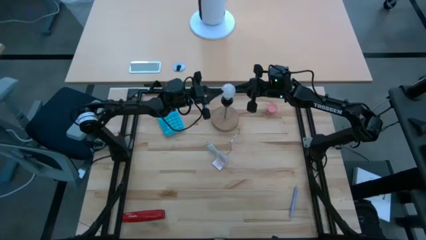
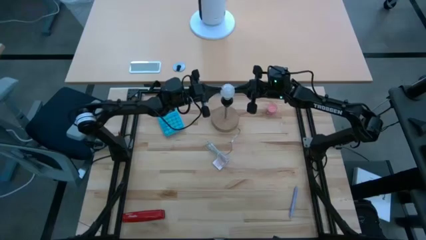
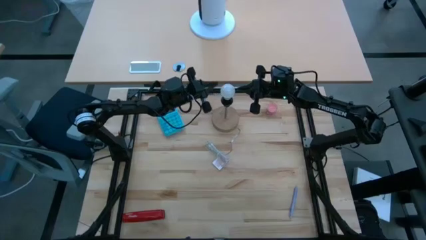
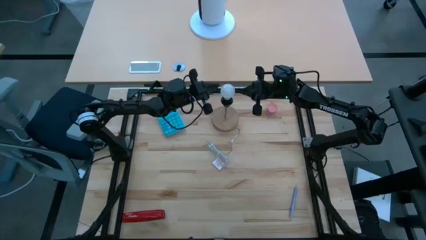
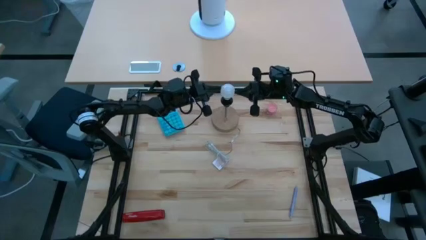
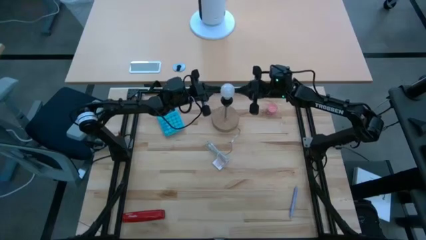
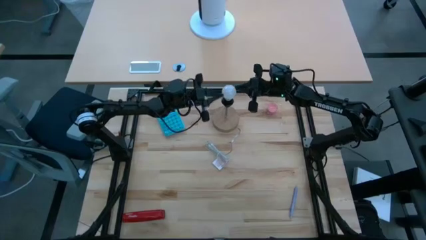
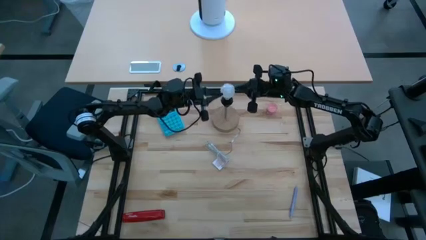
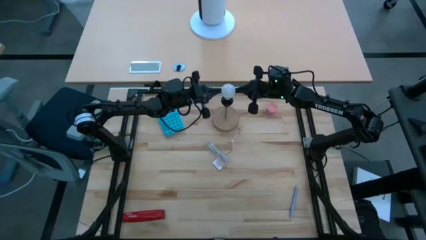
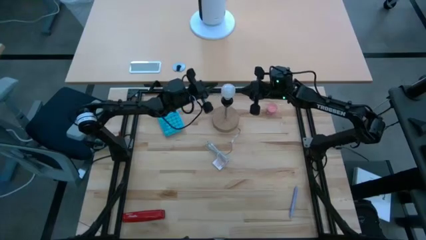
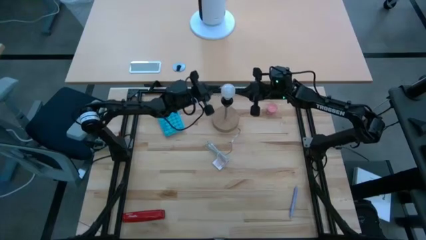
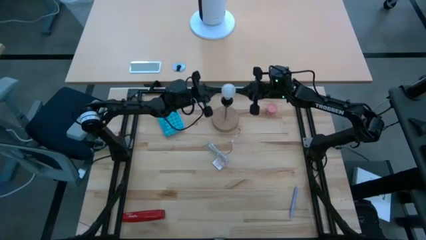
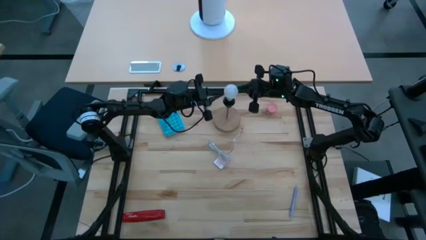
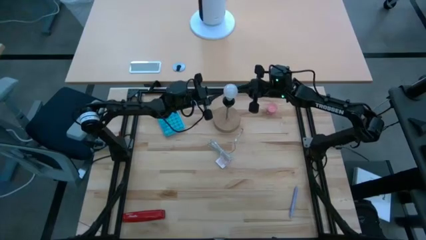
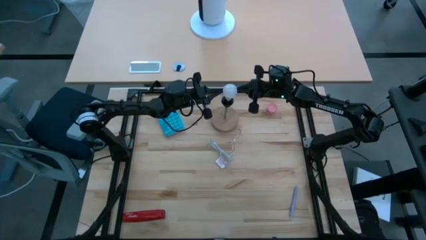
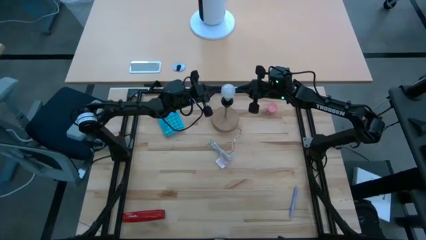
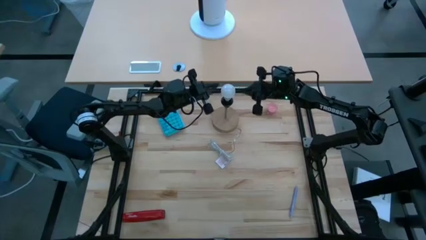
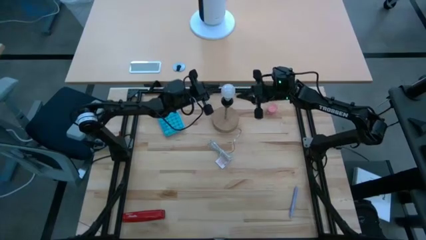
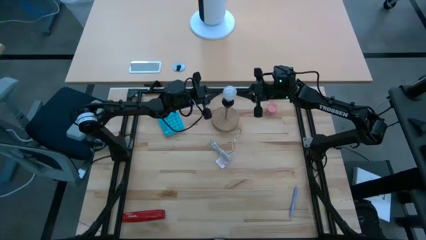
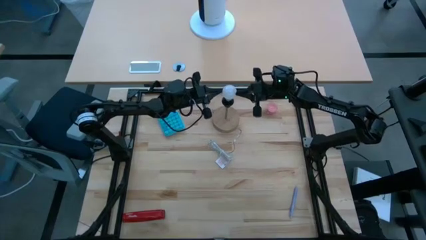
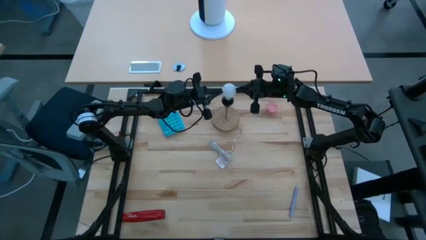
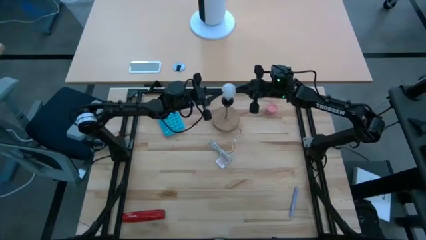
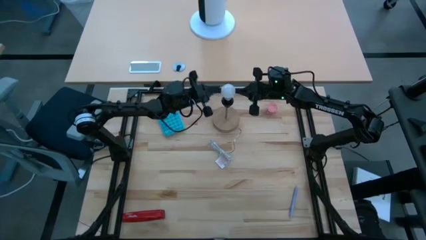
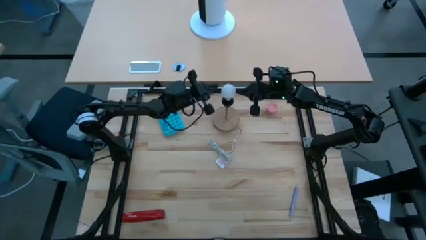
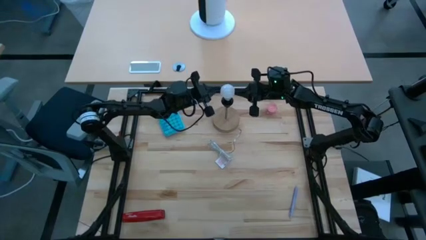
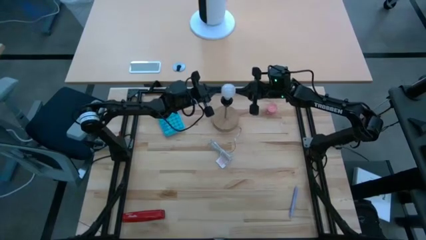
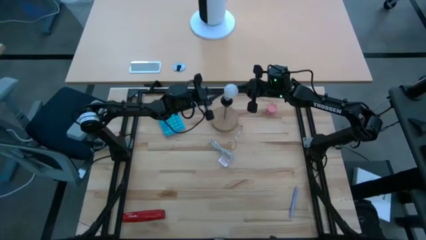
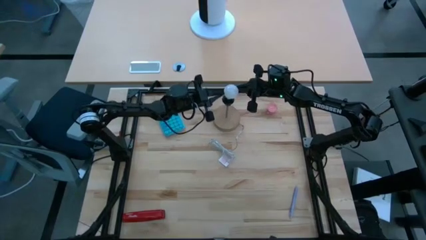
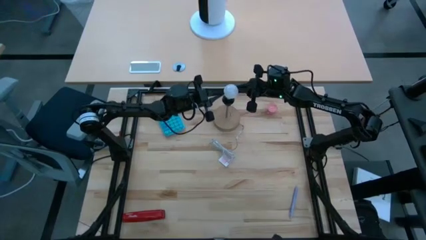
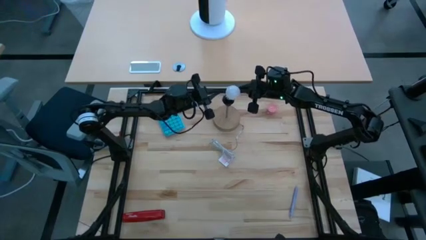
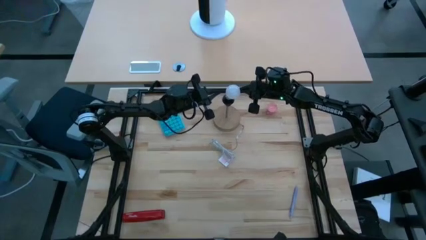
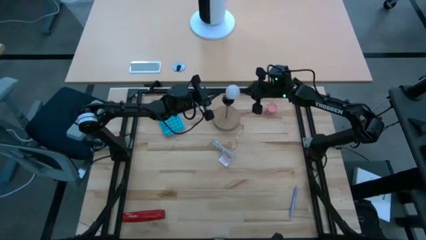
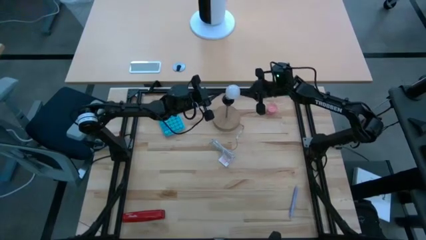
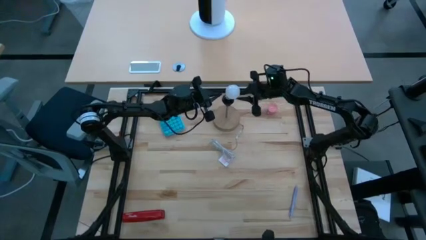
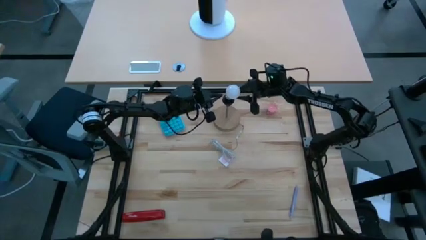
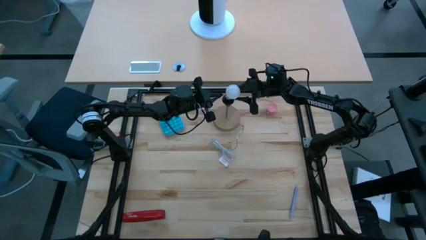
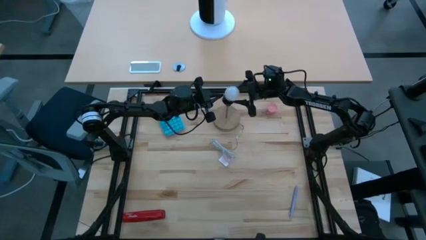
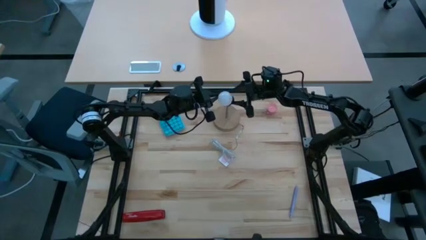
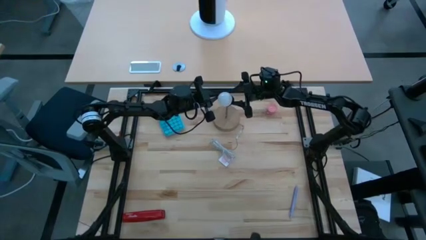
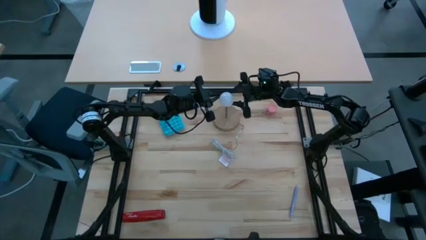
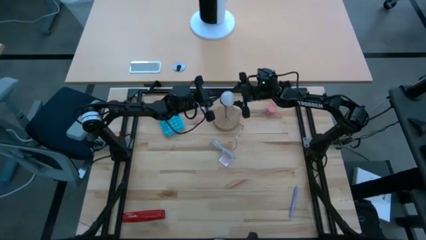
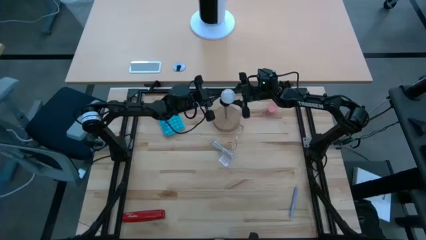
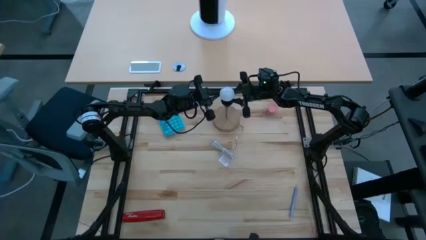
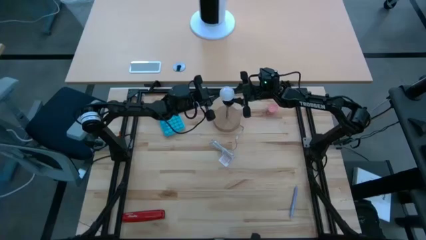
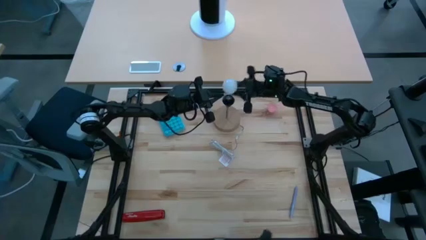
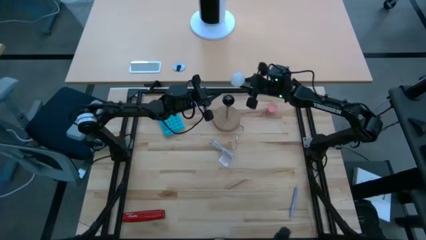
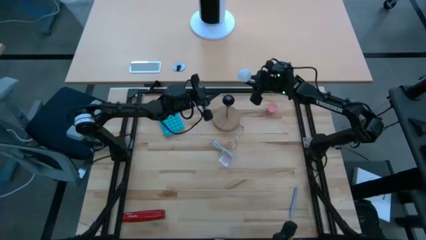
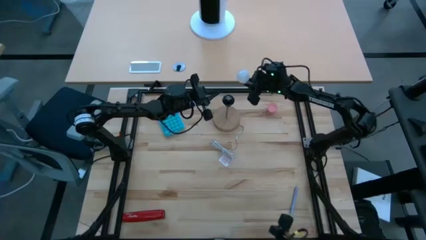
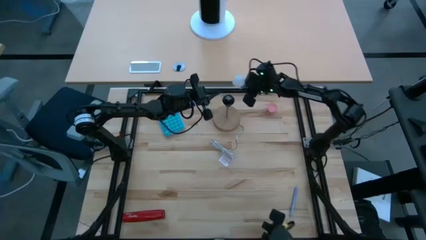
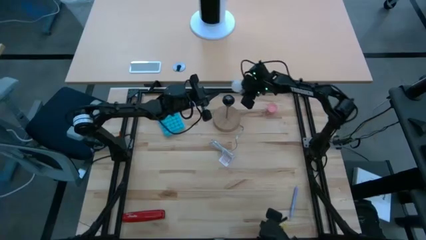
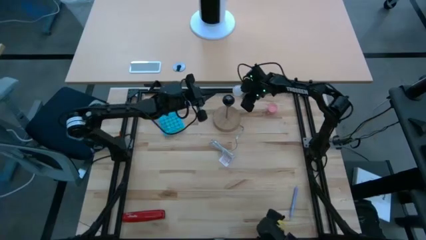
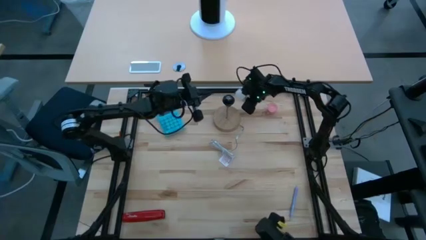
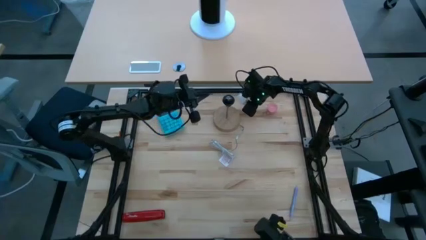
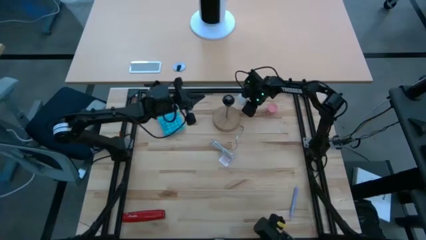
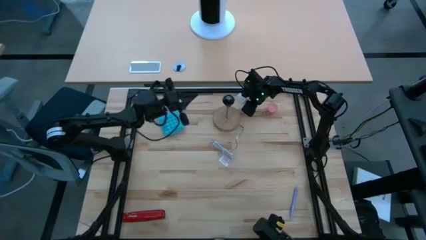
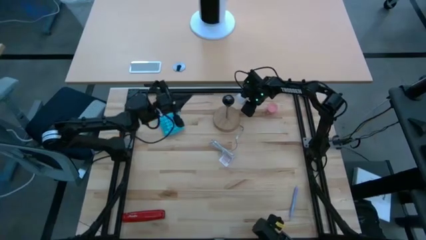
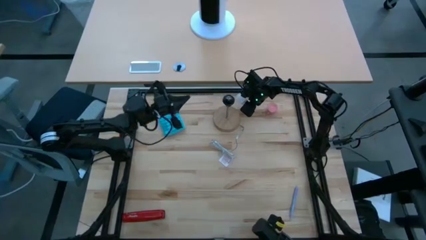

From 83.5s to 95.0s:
Task: Screw lightbulb
Remove the light bulb from the desk lamp
